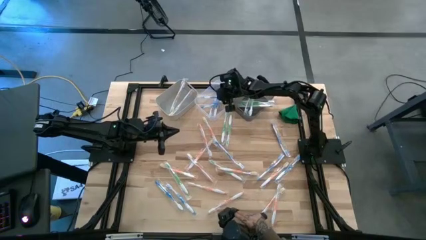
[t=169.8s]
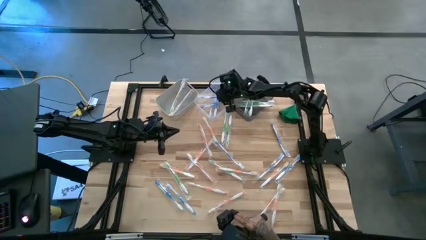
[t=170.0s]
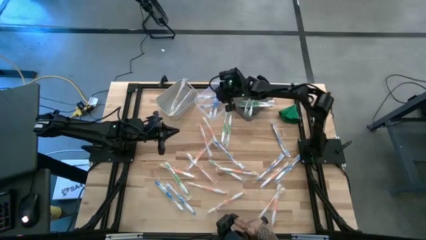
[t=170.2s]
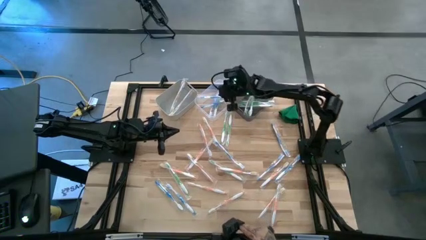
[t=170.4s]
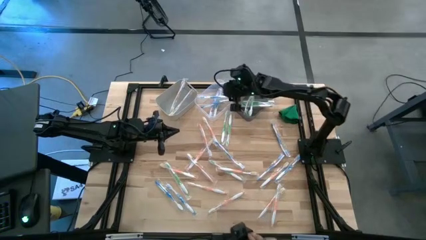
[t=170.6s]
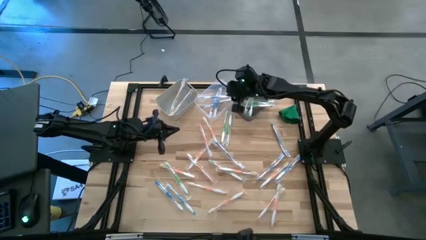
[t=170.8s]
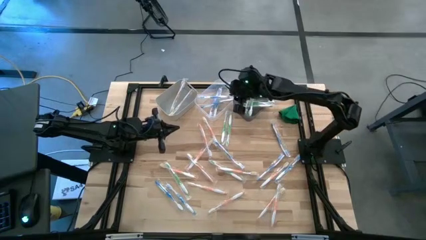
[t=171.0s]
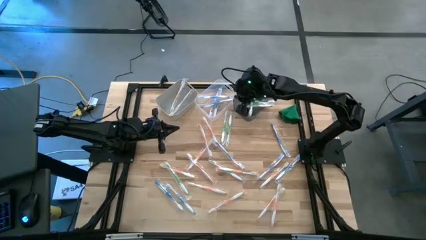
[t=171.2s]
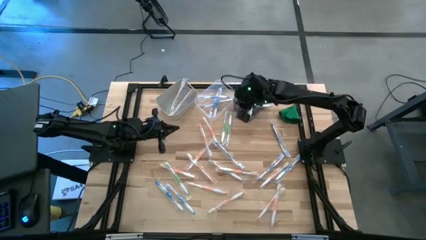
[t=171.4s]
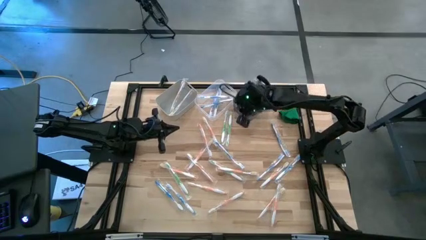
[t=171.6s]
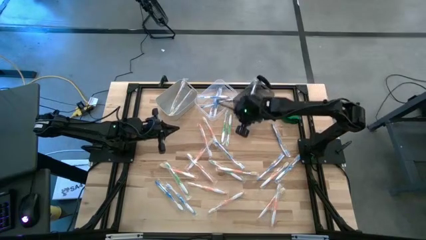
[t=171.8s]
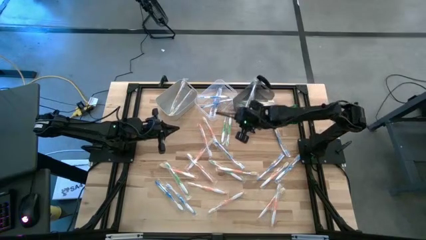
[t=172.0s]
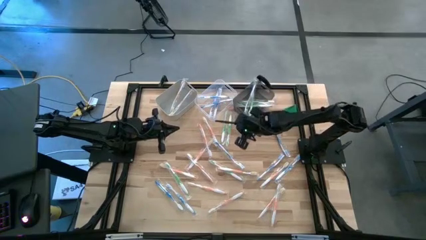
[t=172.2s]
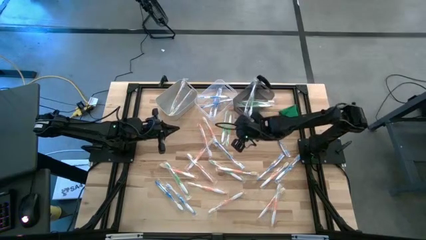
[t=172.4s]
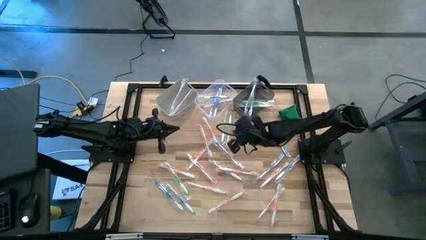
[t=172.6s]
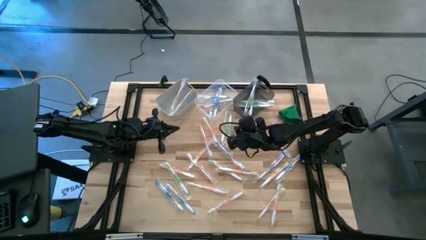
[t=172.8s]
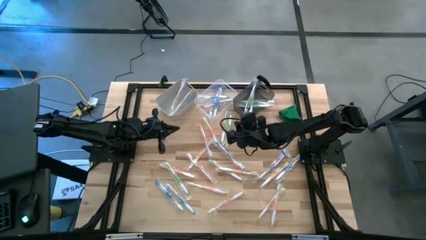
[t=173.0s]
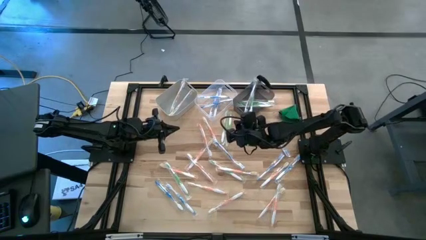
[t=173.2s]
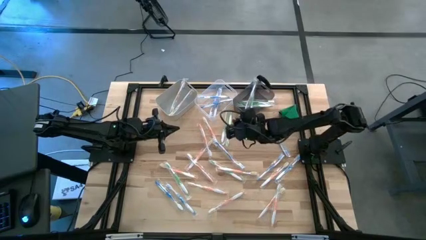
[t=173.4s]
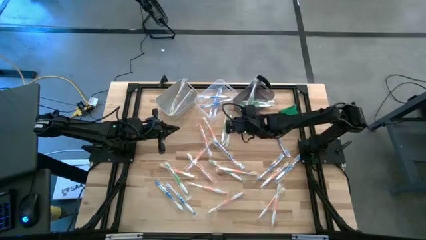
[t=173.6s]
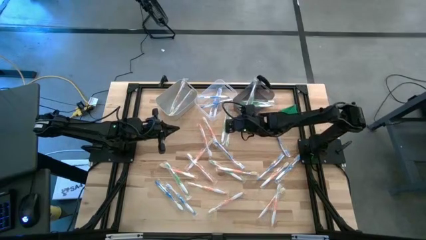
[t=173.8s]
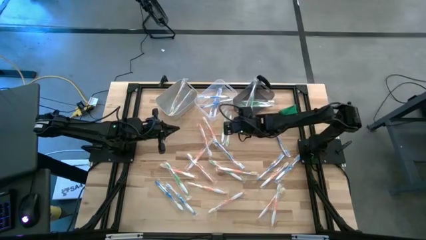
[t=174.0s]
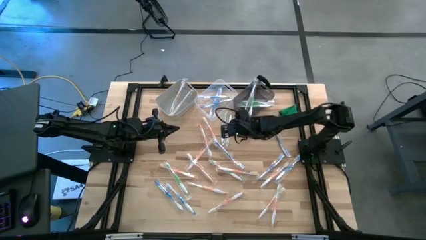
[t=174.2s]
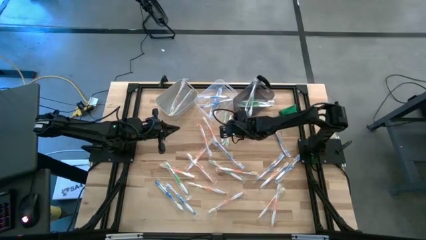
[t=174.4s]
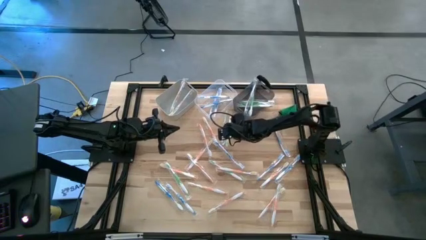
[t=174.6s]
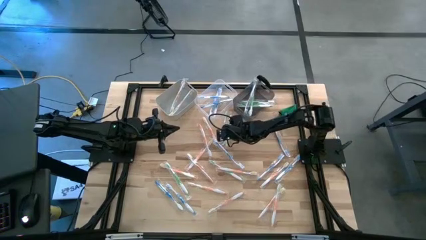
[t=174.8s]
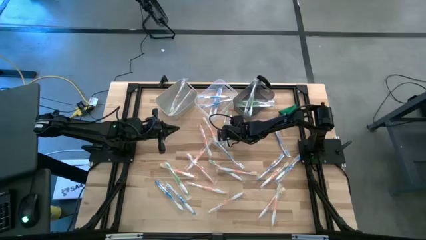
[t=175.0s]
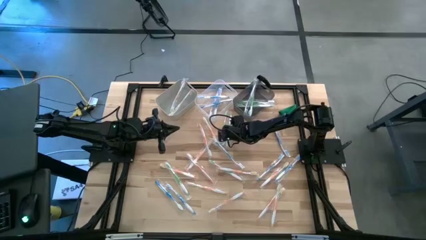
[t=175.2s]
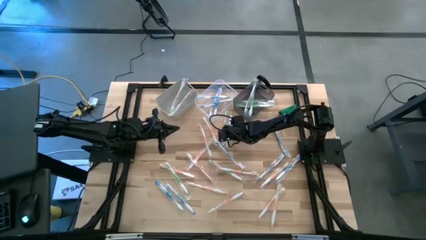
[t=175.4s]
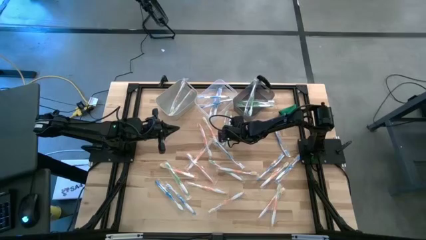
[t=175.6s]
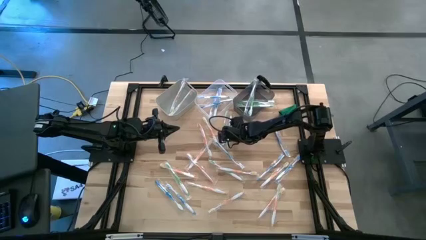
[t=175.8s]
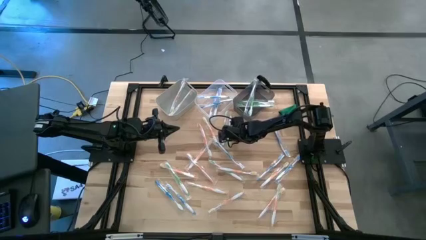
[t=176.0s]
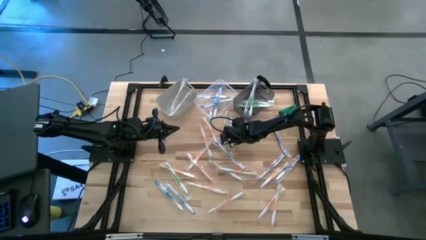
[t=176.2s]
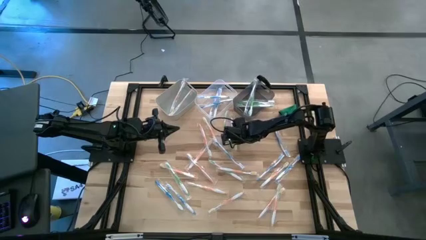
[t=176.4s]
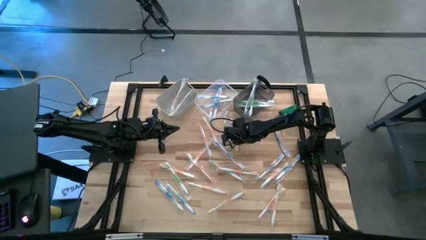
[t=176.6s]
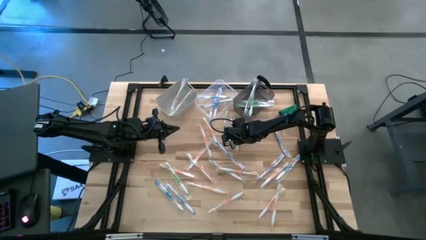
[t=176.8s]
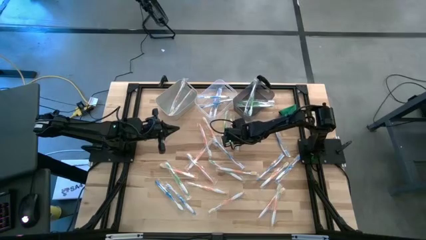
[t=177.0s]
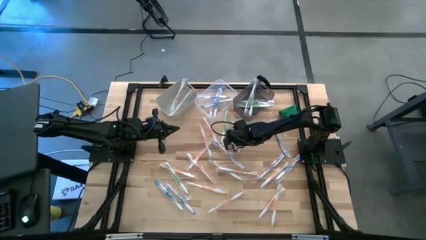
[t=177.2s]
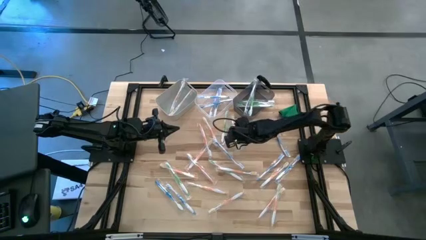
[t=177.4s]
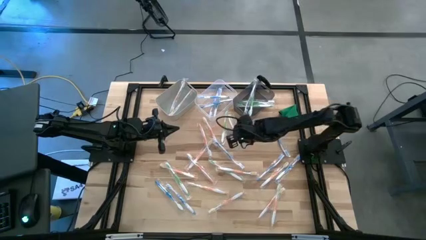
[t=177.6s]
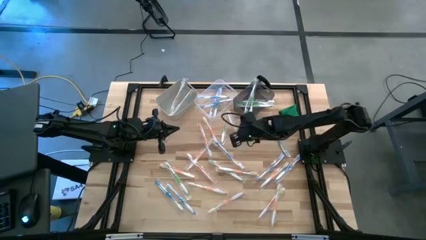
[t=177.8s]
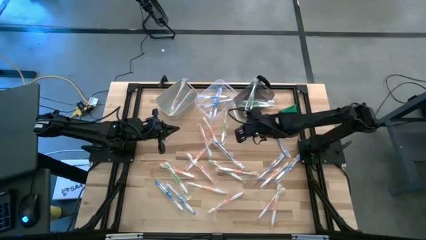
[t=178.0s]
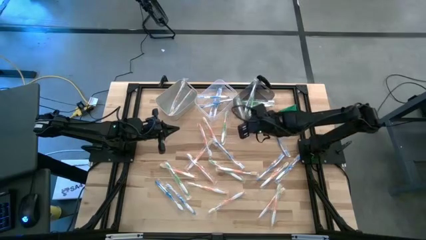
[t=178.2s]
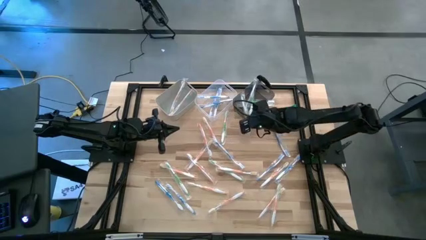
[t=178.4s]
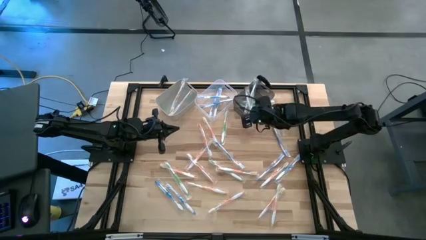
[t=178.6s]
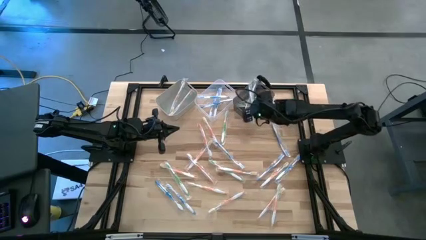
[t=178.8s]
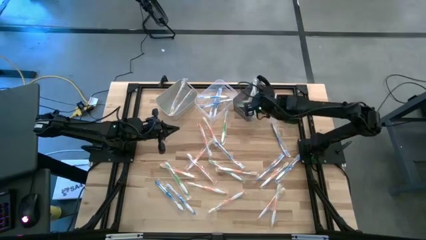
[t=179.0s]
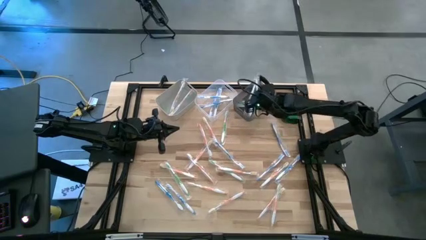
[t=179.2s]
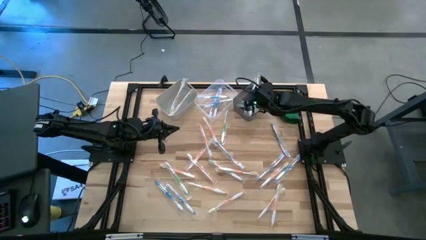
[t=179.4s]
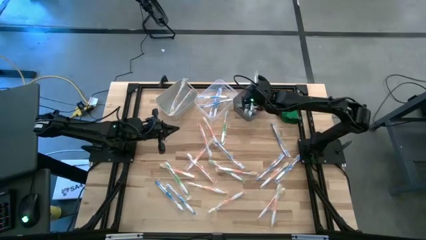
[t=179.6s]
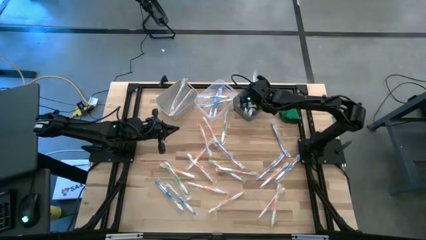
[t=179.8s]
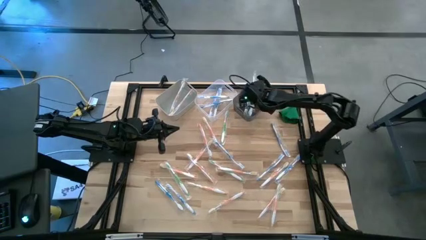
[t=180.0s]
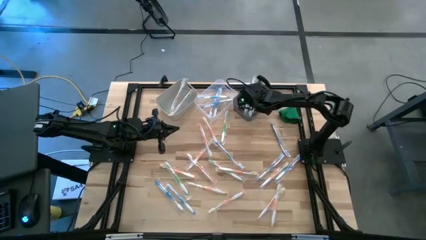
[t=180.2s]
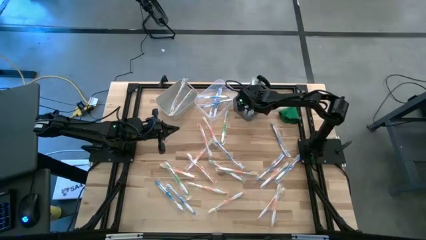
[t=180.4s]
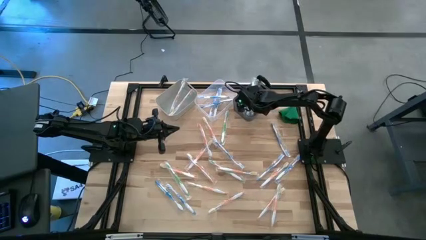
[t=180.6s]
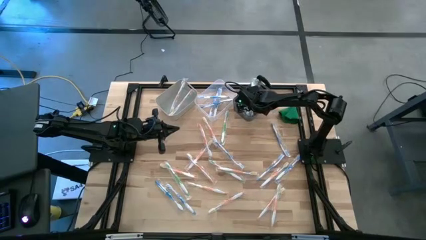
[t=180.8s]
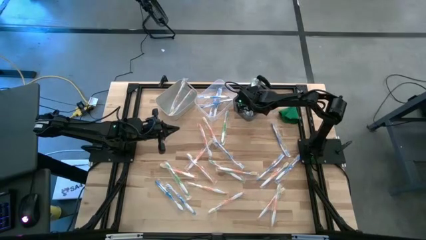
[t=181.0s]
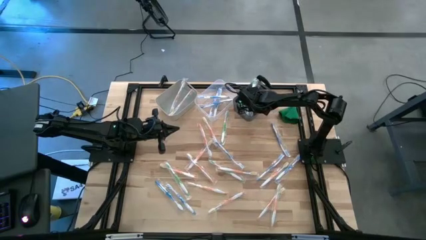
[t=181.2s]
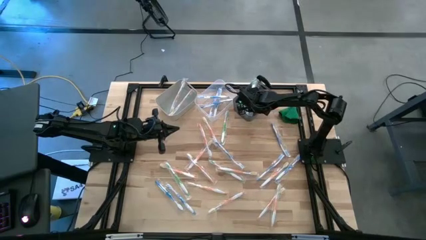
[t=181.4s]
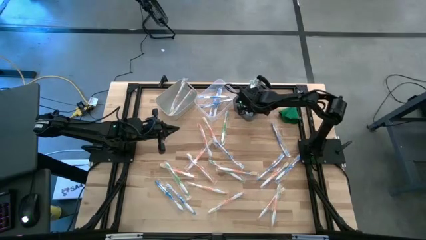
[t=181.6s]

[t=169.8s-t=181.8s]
Task: Pick & Place Toothbrushes
Put the green toothbrush into the black bin

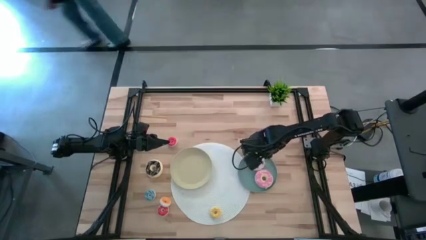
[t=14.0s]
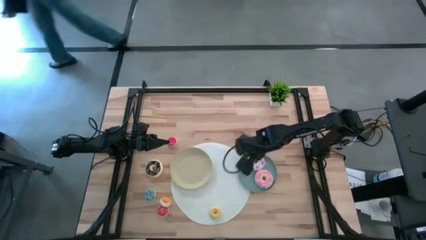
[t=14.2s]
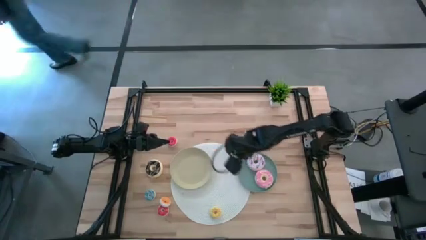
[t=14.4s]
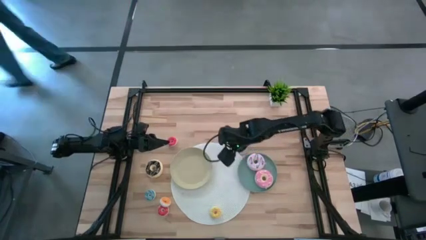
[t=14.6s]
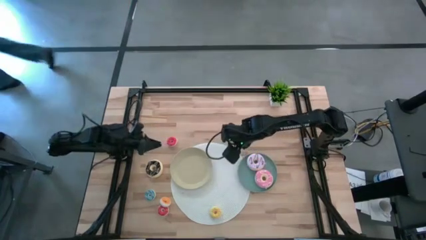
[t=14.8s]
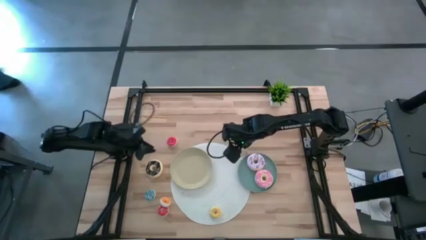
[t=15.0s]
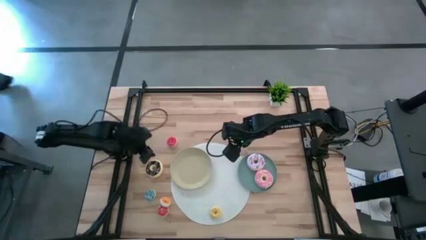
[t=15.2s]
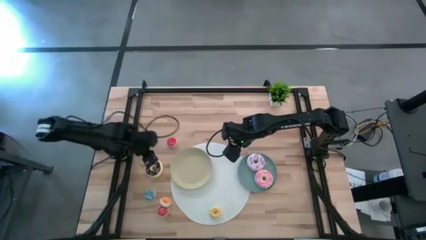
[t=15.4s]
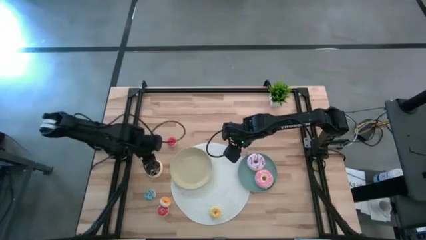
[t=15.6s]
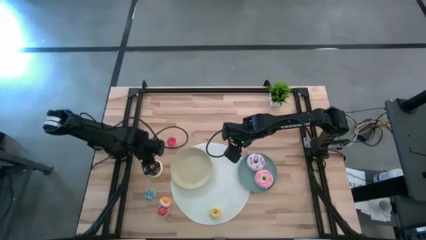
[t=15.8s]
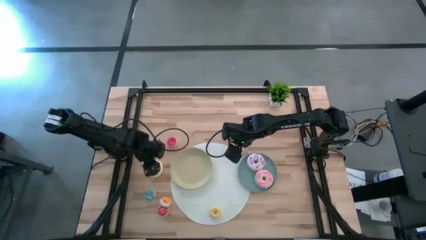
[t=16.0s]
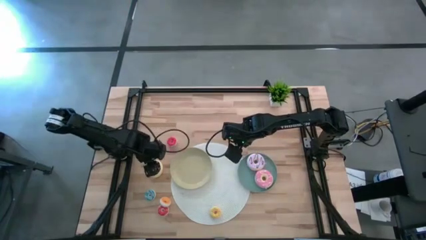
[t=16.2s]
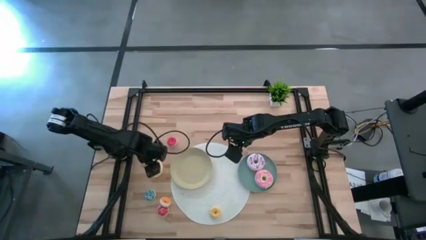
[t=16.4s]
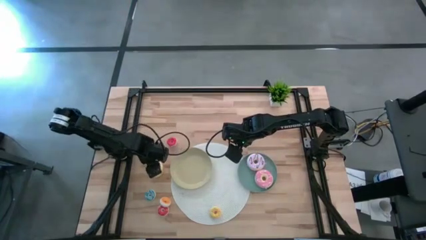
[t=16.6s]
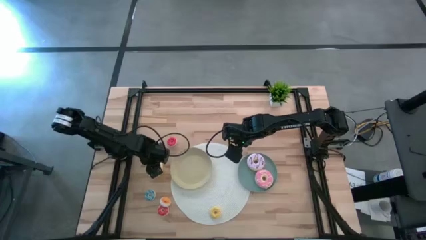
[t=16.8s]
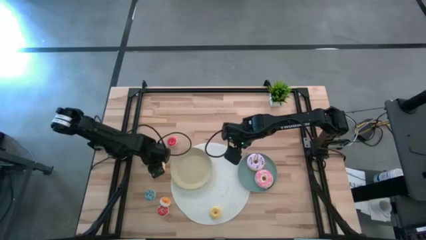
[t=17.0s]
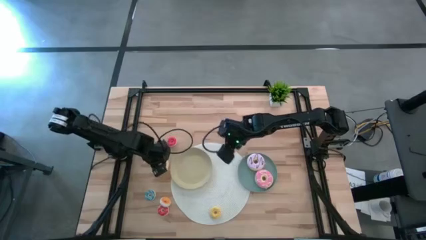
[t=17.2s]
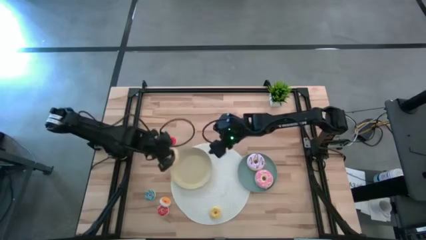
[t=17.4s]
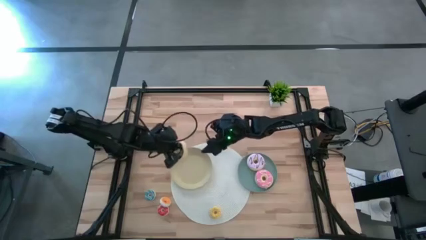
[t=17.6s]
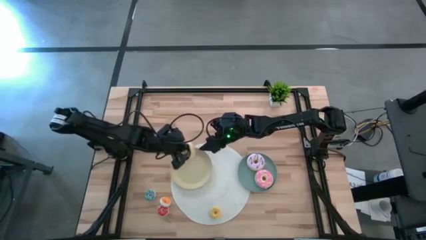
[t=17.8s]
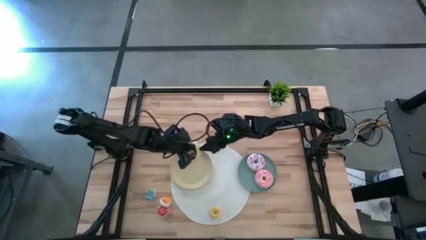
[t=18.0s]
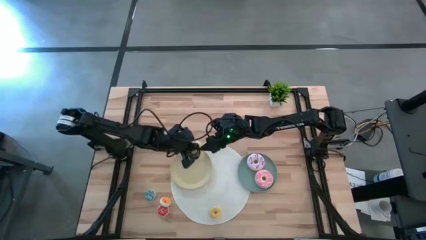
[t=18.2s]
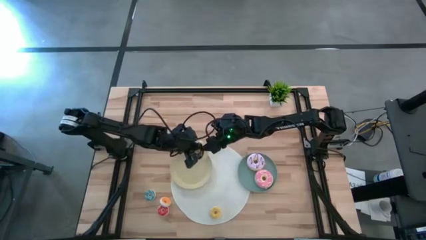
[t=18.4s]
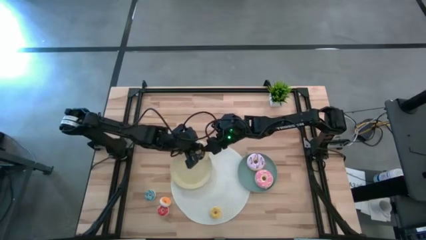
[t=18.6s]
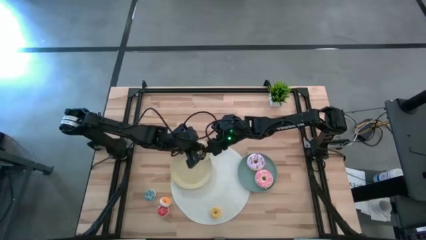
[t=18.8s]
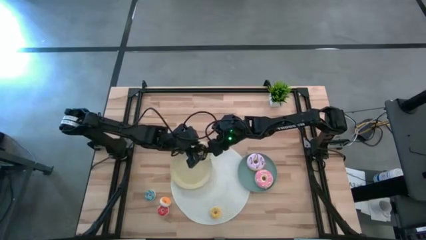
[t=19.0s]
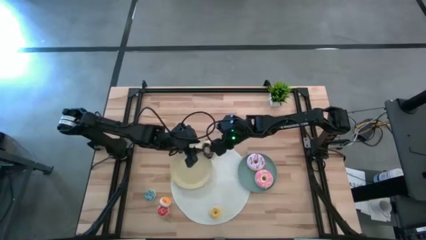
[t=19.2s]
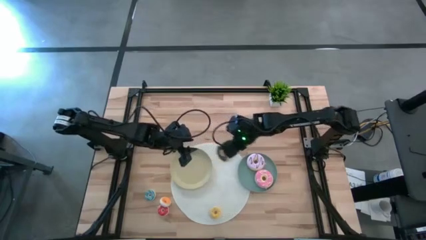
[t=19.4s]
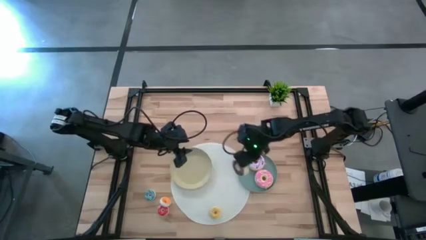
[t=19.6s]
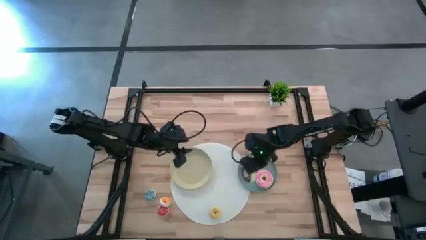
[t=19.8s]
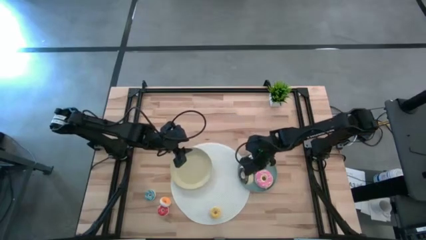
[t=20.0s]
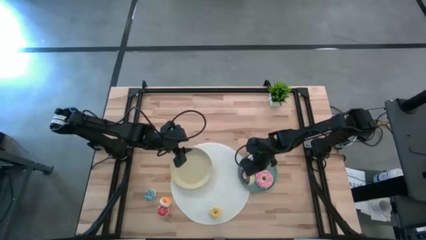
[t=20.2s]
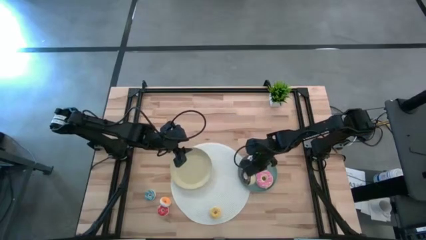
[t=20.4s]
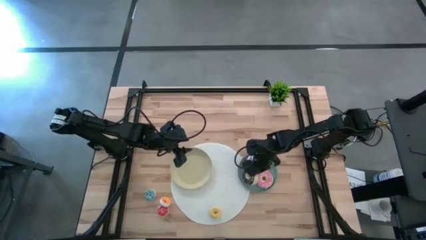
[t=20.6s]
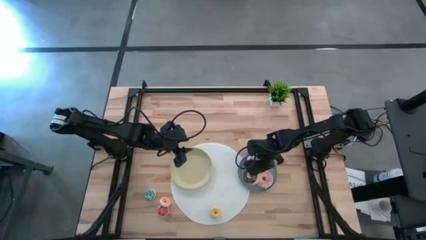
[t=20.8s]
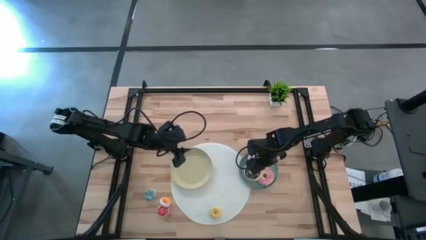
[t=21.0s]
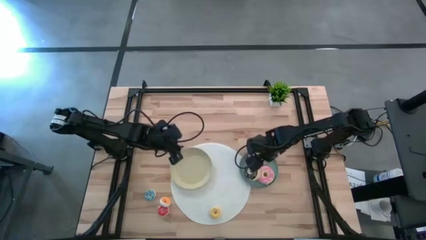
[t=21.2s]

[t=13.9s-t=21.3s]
Task: Pick & Place donuts
Put the big black donut on the blue plate
